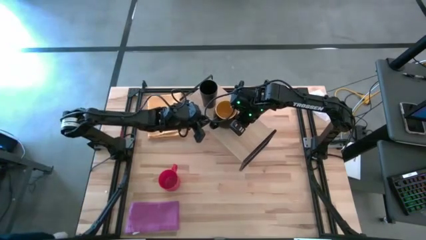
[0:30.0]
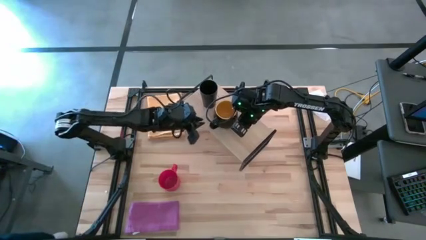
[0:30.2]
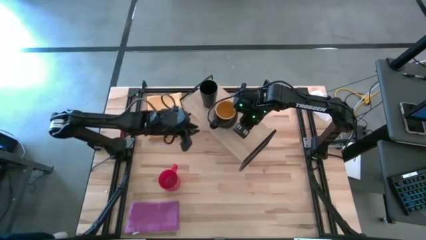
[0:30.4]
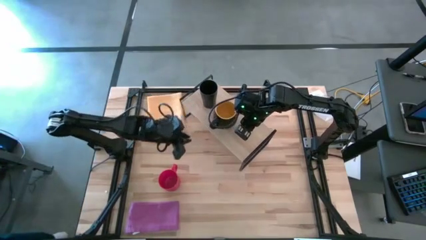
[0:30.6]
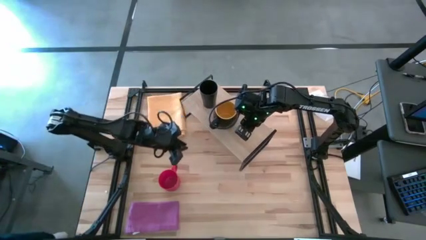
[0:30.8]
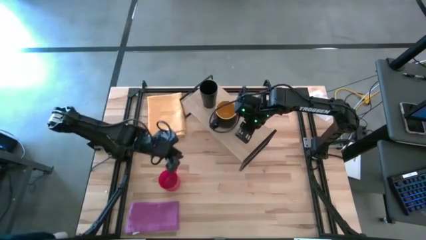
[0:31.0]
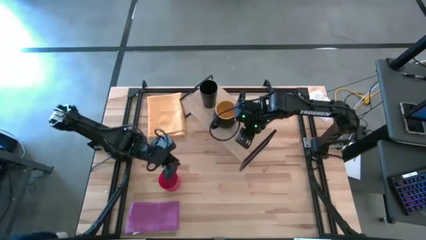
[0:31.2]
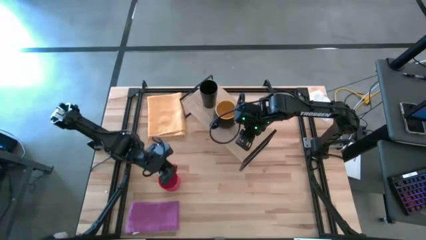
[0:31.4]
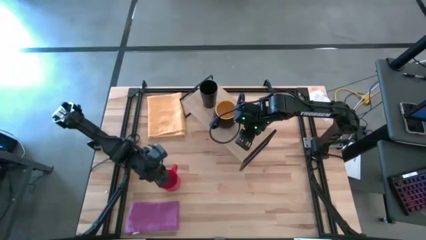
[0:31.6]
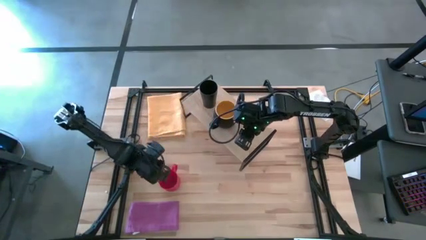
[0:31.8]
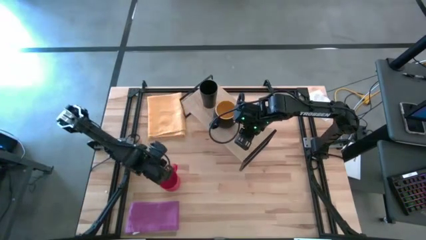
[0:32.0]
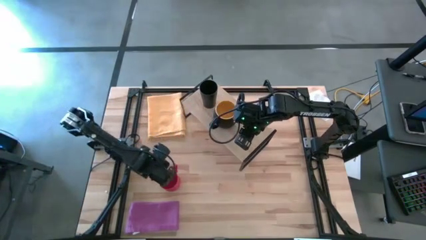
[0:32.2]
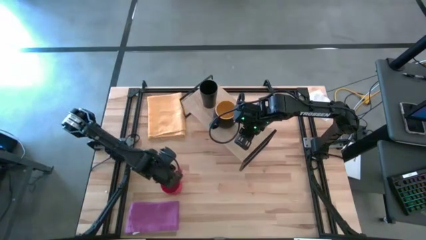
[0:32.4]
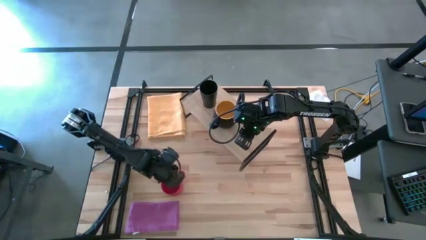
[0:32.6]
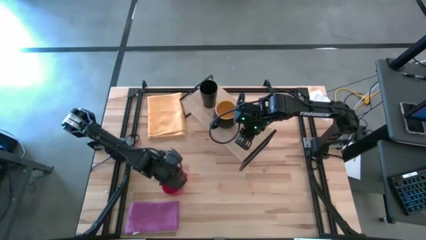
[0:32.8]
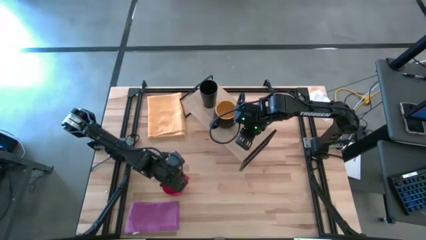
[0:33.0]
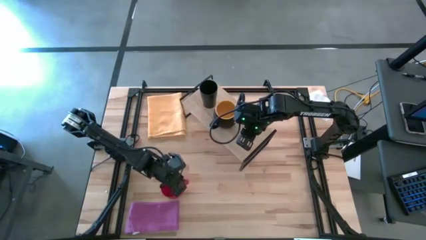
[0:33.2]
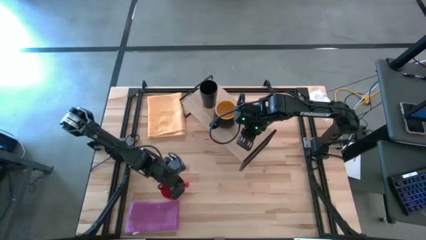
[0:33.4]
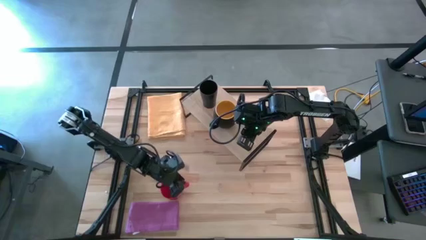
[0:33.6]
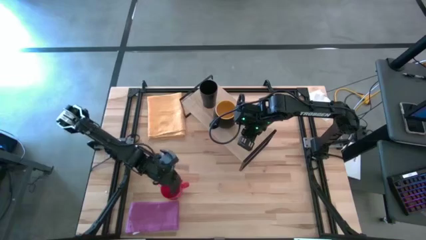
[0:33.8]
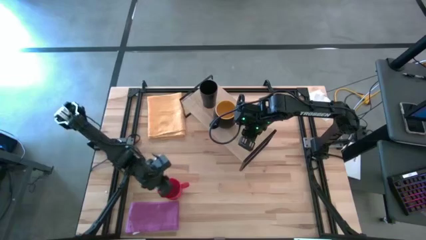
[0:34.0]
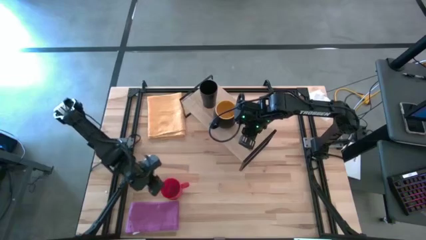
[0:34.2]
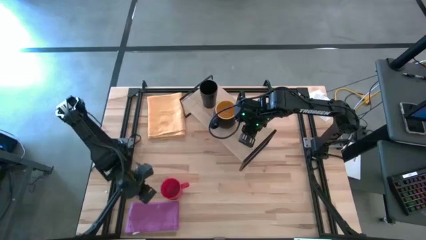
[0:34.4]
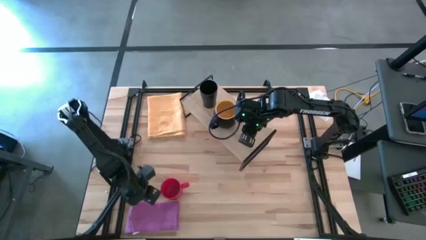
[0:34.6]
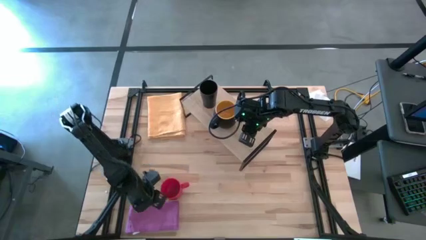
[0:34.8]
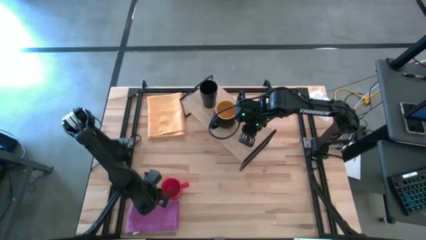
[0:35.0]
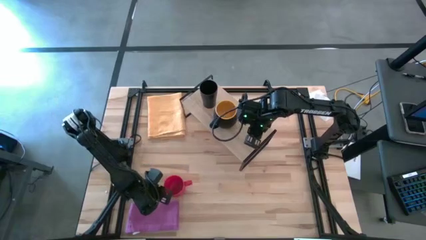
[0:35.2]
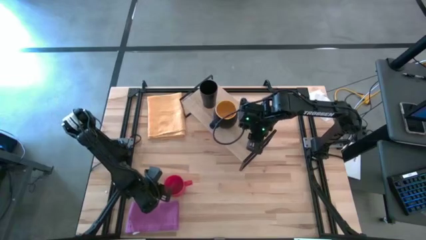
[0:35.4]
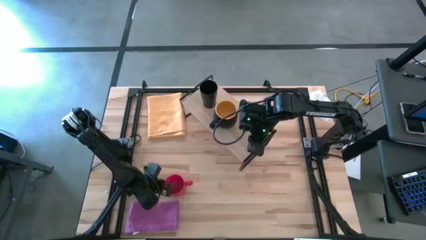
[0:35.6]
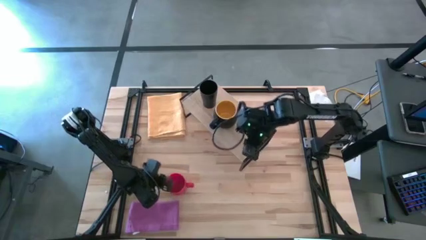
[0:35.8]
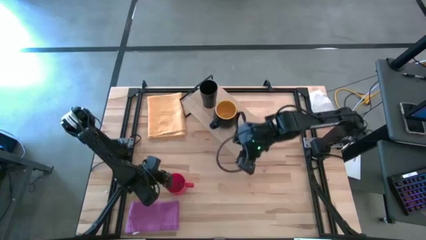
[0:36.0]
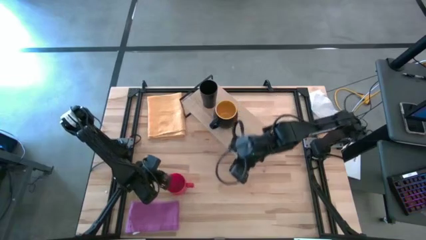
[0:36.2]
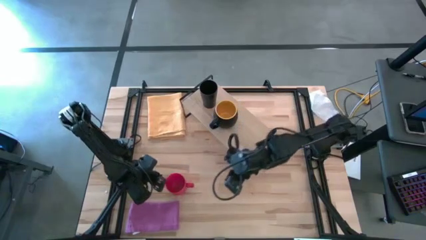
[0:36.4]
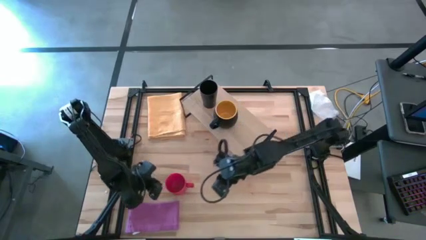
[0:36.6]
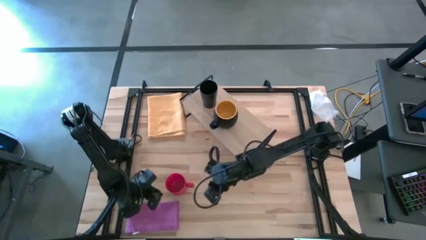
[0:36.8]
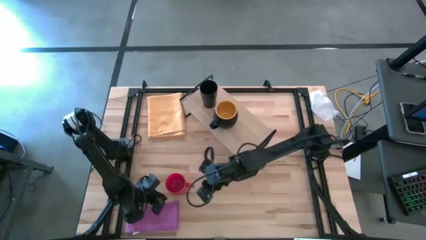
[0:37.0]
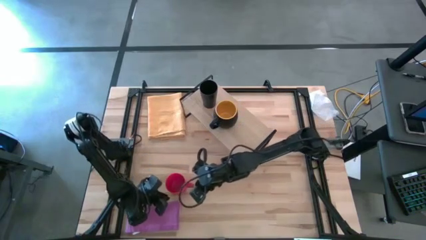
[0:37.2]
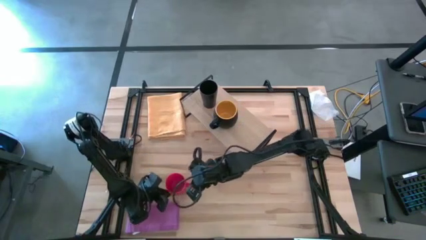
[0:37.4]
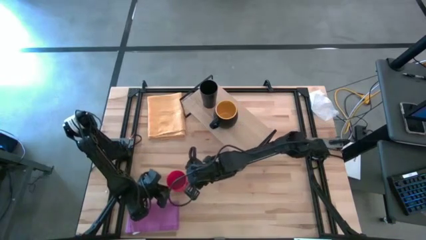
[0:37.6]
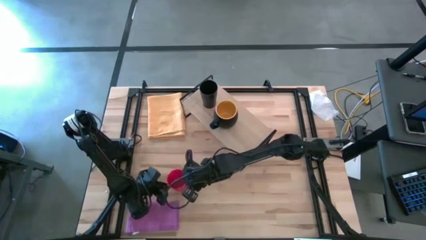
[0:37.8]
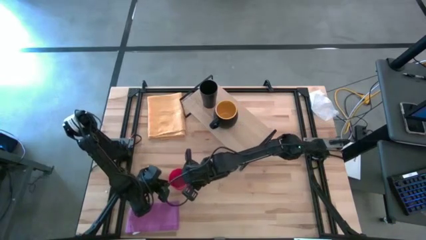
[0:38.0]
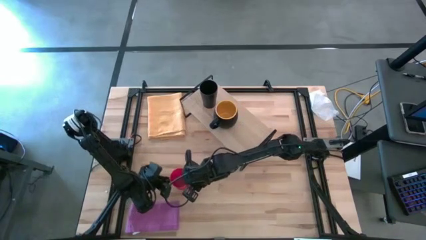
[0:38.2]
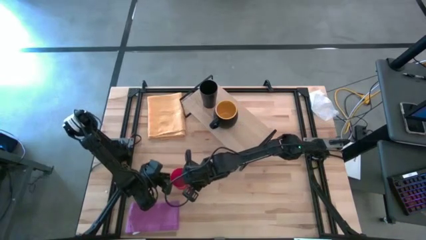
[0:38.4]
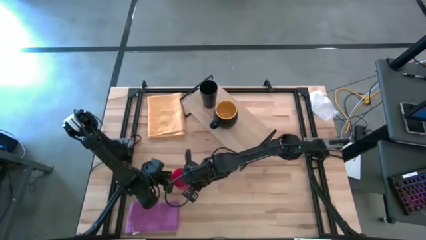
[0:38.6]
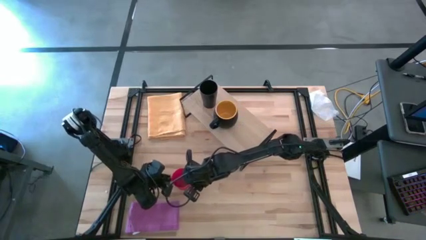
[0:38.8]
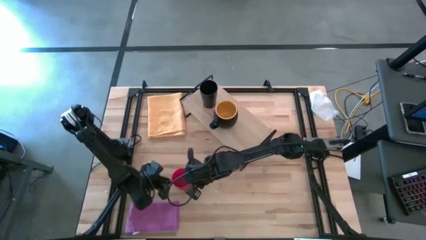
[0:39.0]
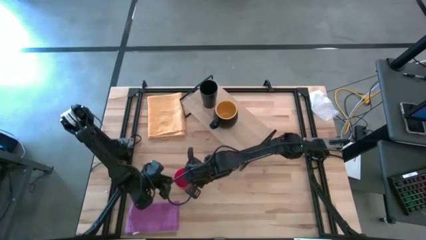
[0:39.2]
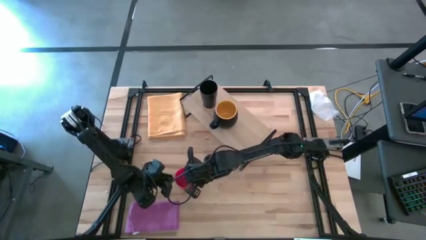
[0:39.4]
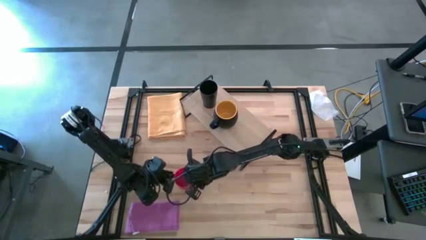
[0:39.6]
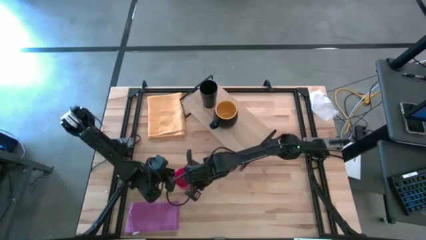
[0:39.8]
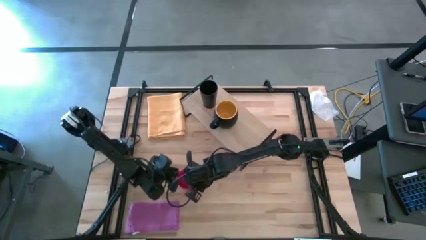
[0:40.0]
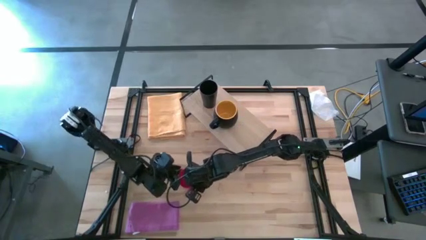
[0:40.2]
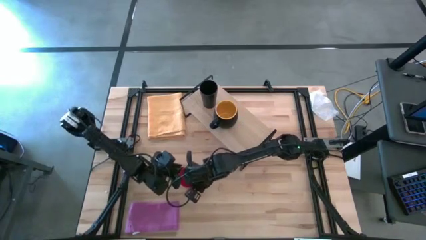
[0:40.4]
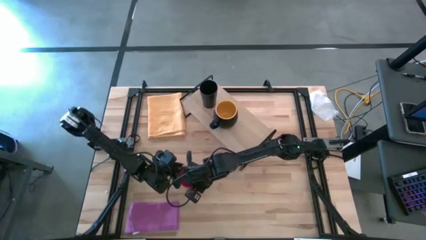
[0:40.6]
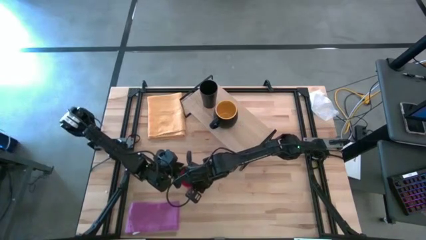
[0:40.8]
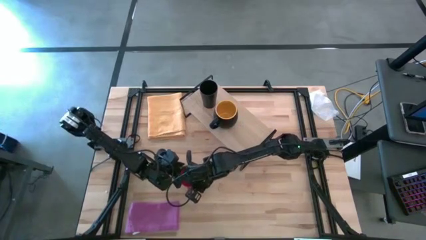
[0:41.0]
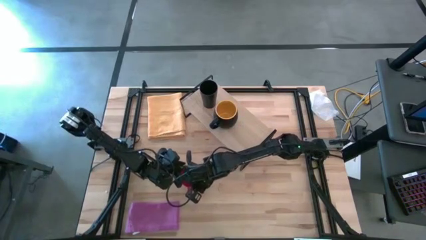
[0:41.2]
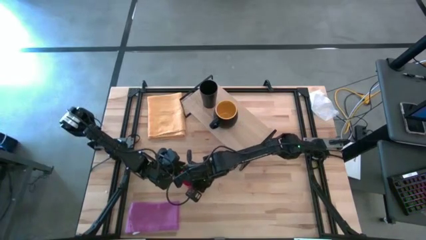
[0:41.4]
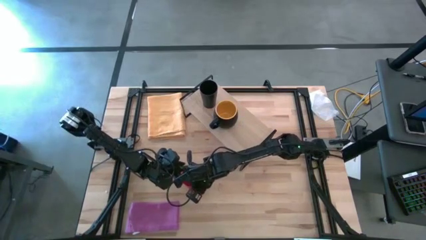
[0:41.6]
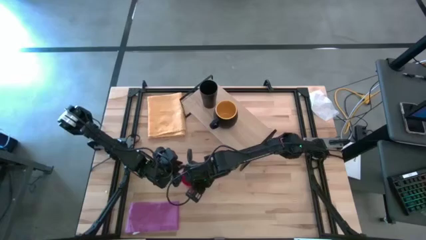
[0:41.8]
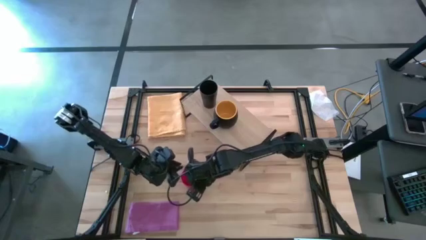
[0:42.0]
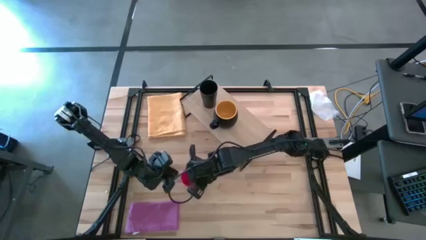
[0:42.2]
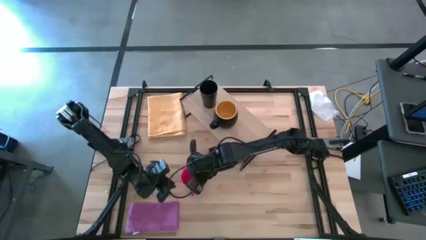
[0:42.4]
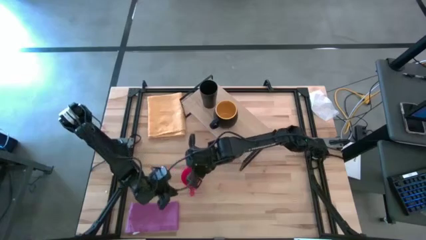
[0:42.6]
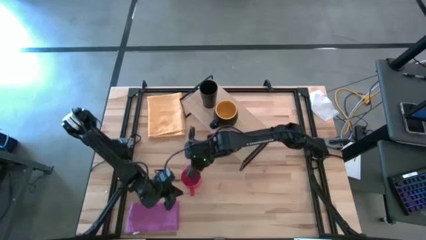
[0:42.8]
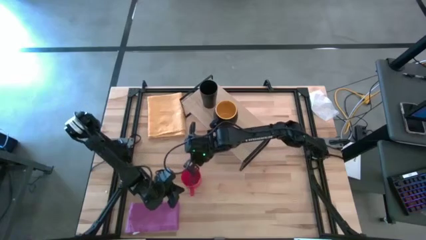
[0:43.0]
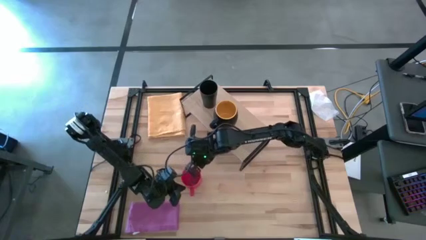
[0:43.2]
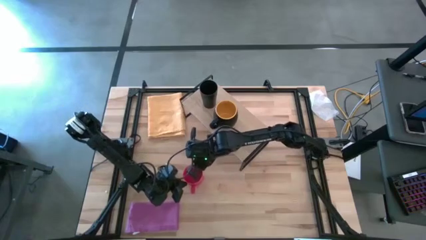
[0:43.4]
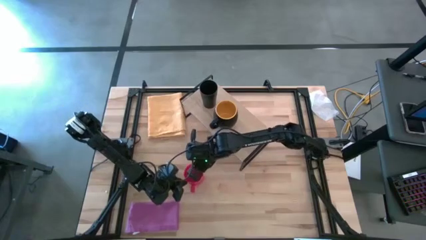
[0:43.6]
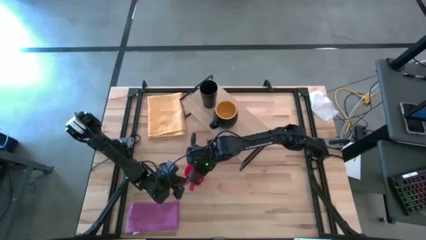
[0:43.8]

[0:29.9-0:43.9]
Task: Stack small to large cups/mugs on shelf
Put the red mug on the shelf
